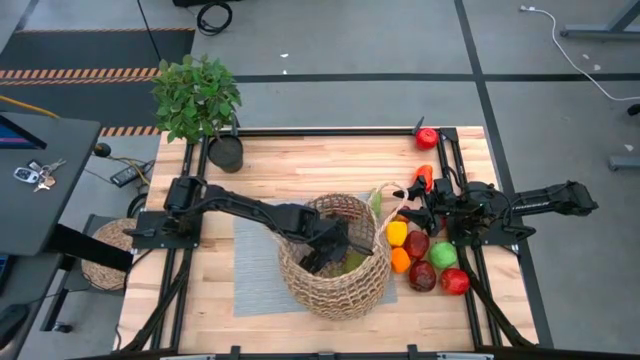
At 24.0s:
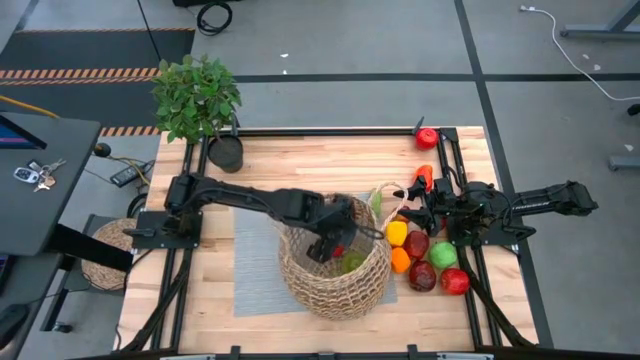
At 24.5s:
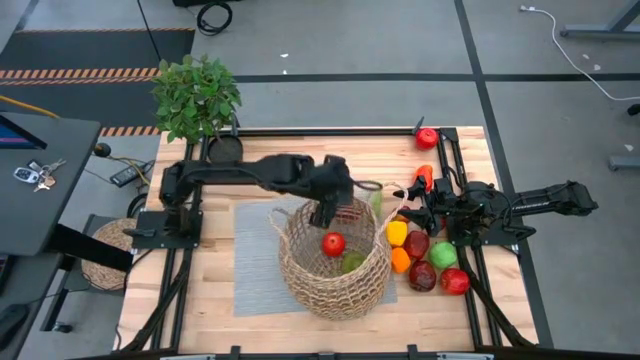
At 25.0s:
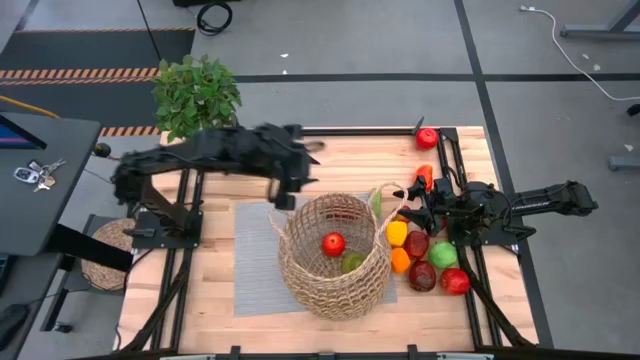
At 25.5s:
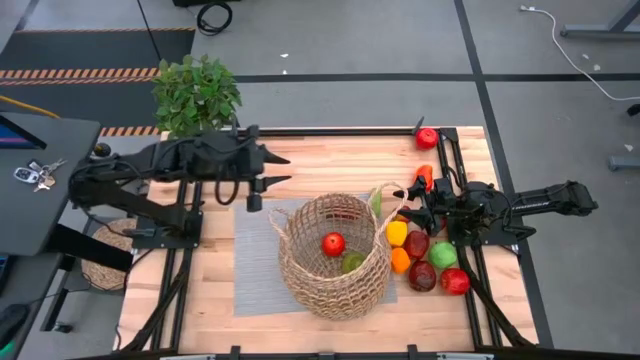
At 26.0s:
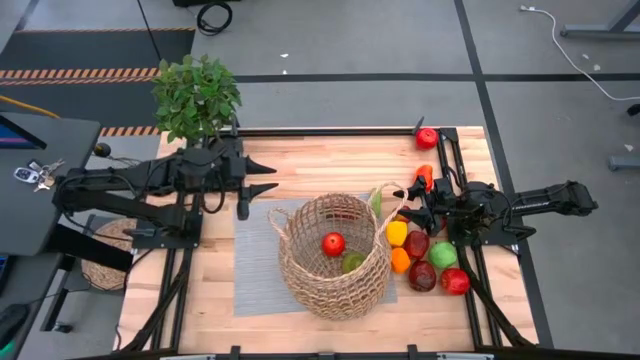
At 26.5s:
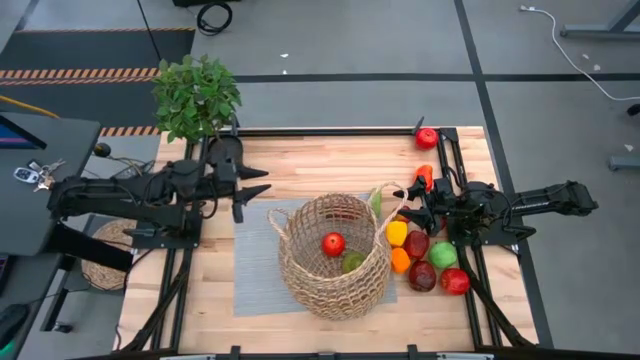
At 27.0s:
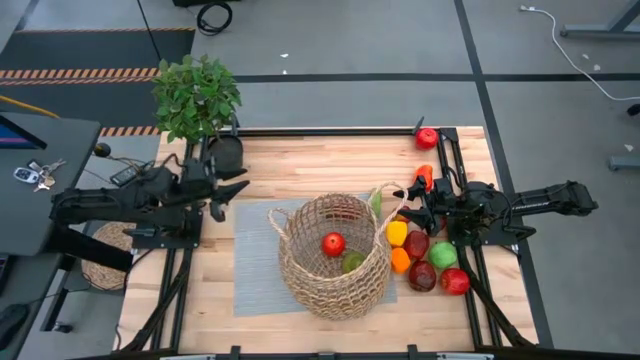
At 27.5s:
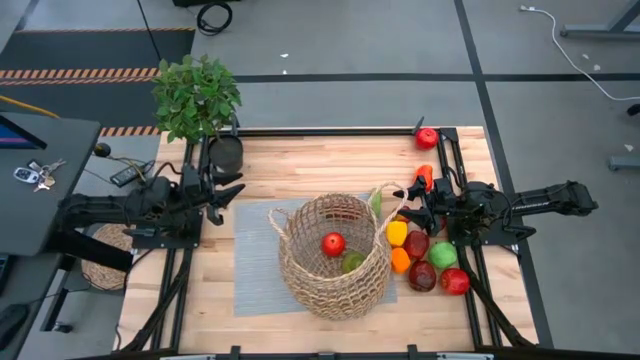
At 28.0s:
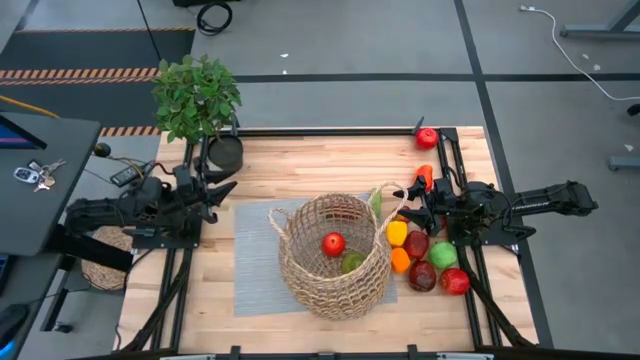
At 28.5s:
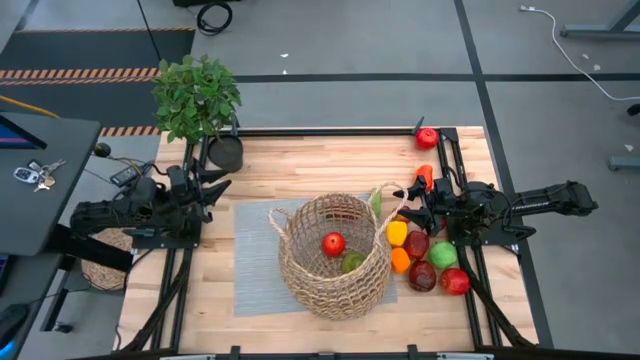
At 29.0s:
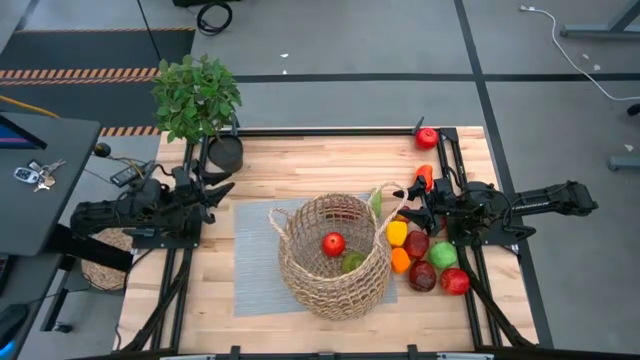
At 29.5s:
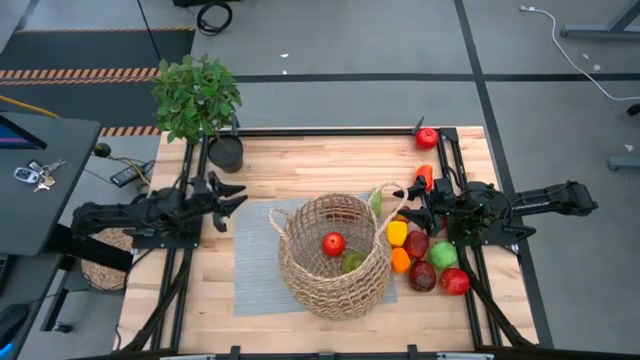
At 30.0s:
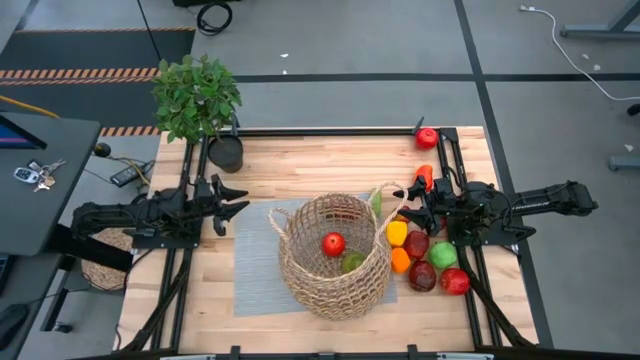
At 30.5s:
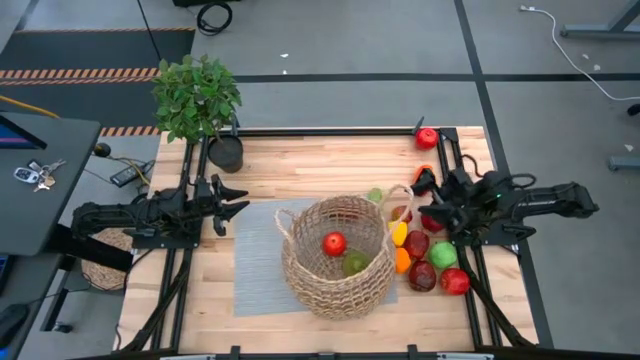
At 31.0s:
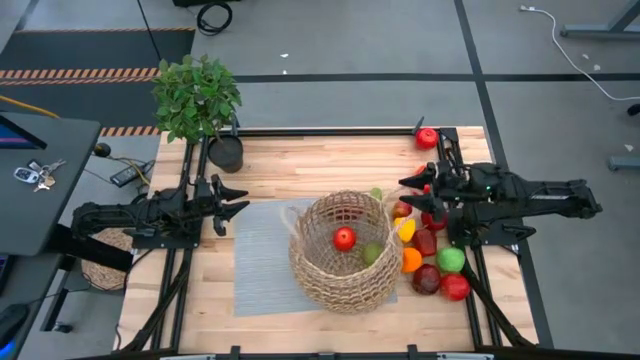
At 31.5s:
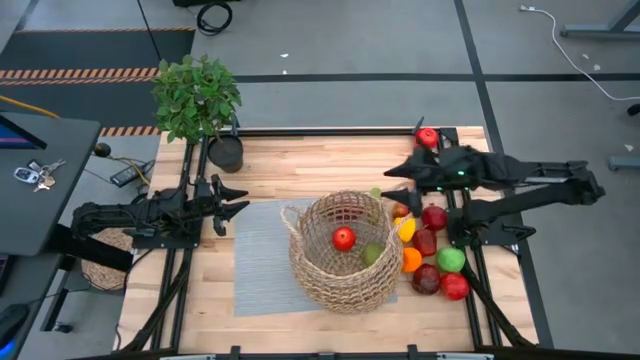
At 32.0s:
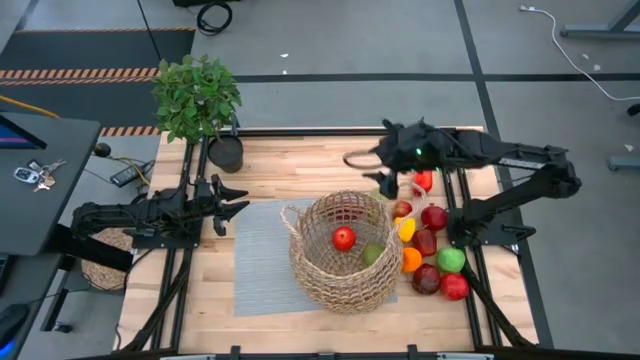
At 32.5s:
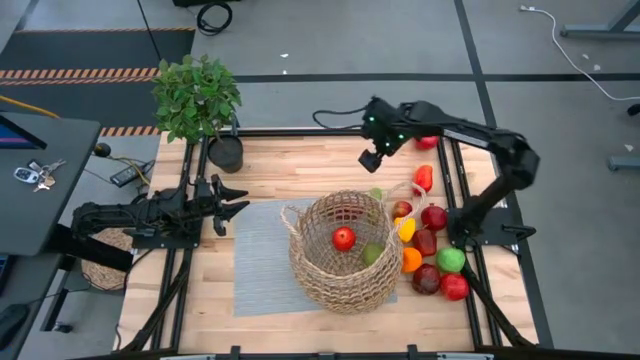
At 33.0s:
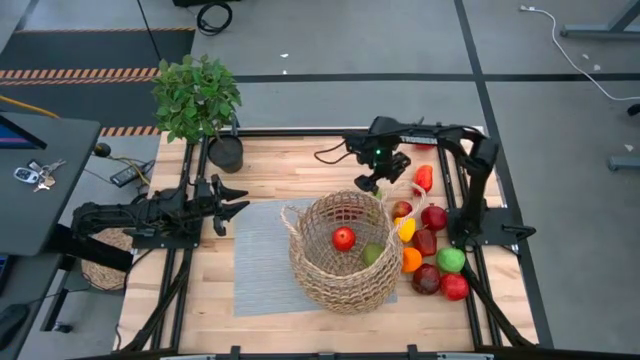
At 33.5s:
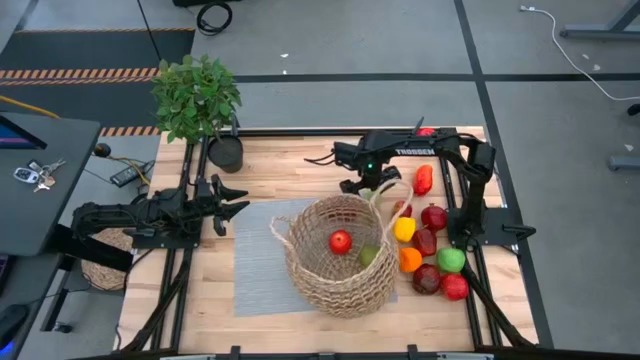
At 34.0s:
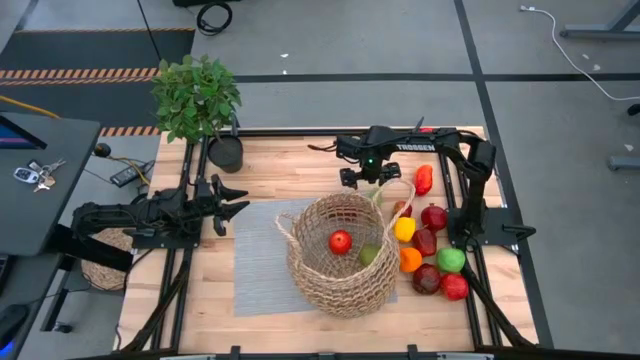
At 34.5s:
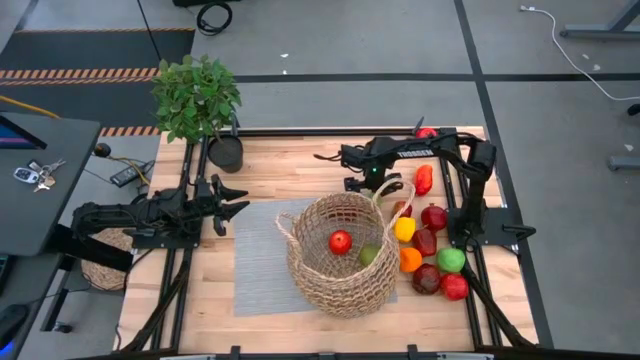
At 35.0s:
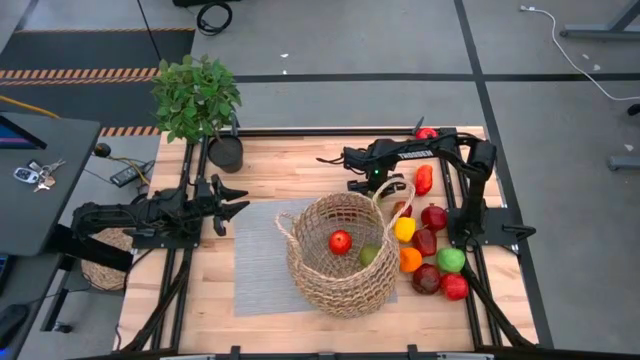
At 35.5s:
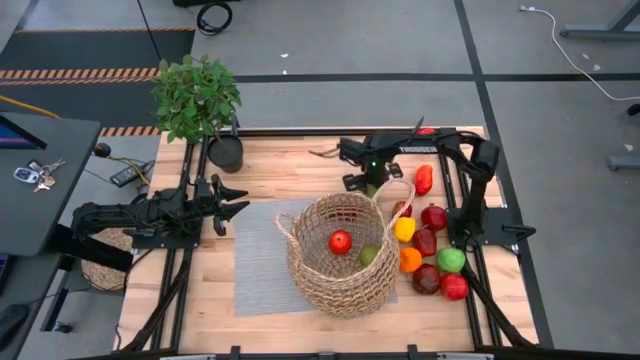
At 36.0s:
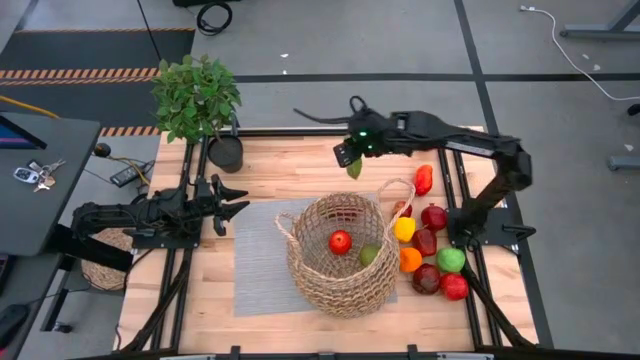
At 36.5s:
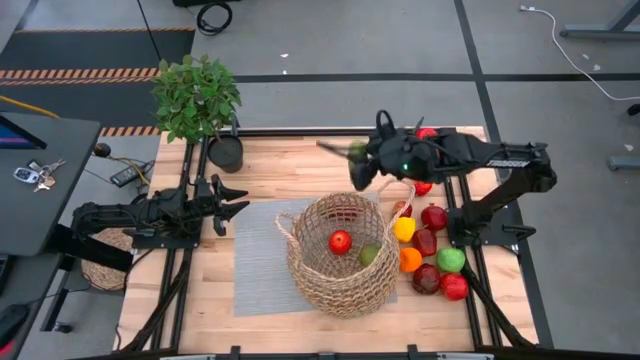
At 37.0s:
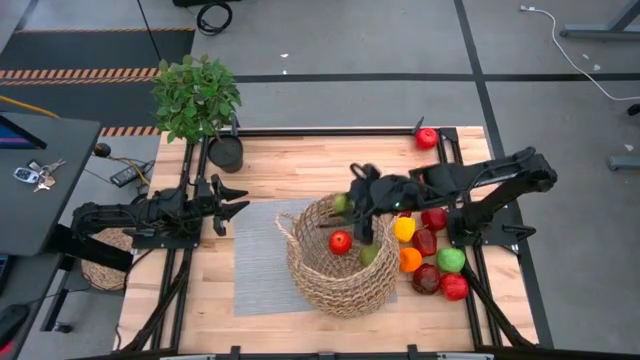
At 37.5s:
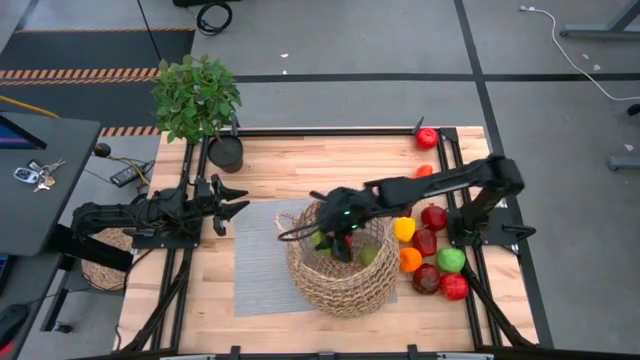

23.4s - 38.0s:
Task: Build produce basket
Put the green cucumber into the basket

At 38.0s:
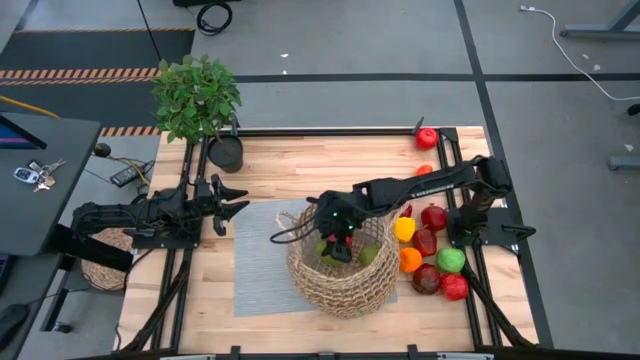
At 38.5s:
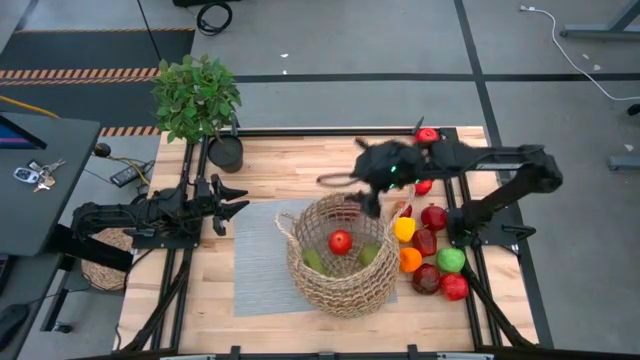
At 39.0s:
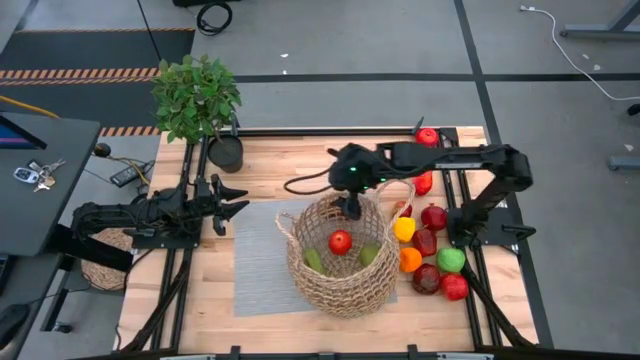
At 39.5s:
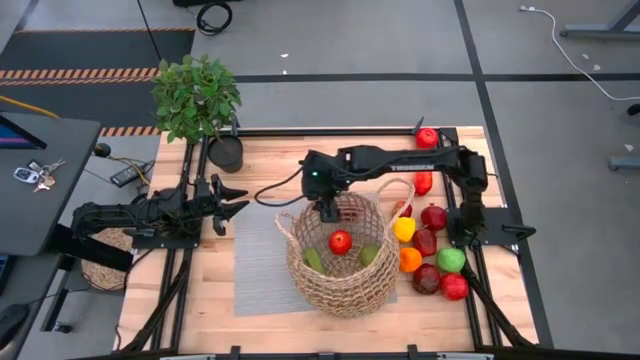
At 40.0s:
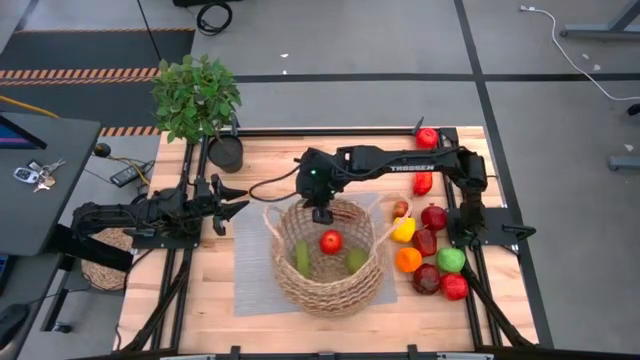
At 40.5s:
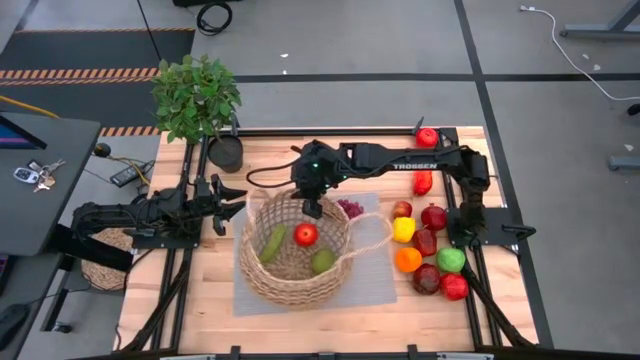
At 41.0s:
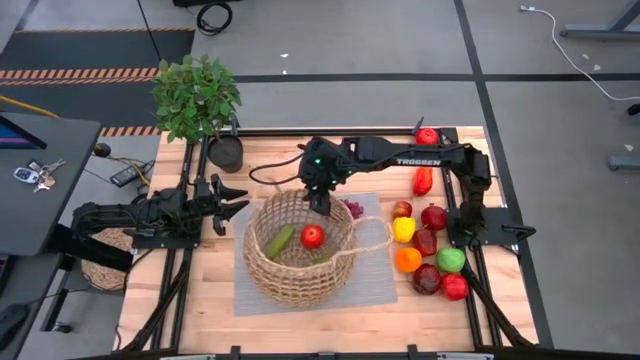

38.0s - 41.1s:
Adjust the basket

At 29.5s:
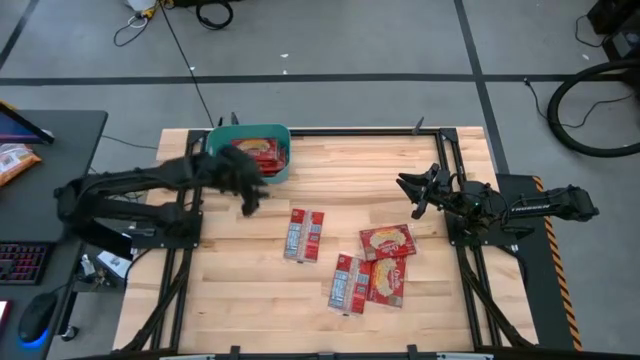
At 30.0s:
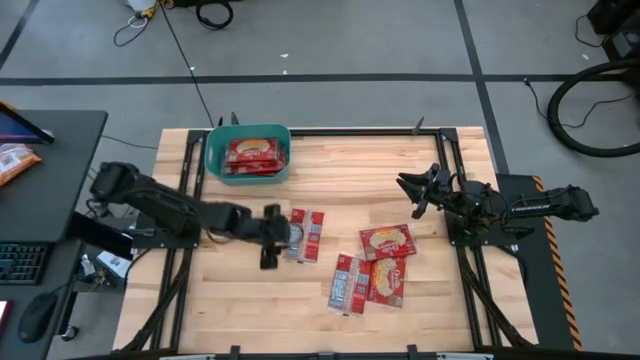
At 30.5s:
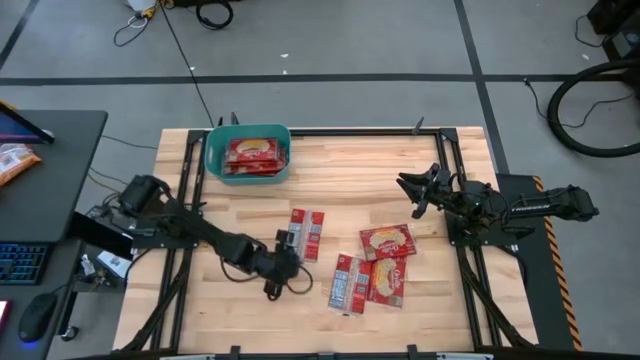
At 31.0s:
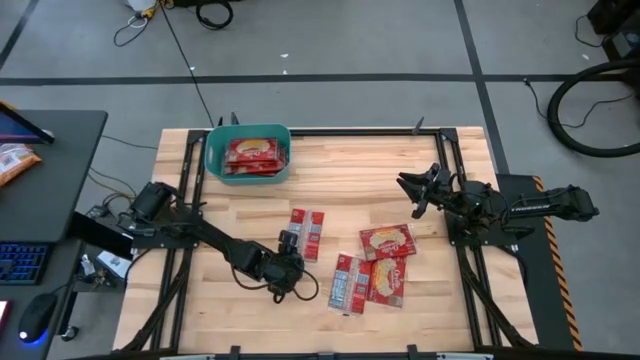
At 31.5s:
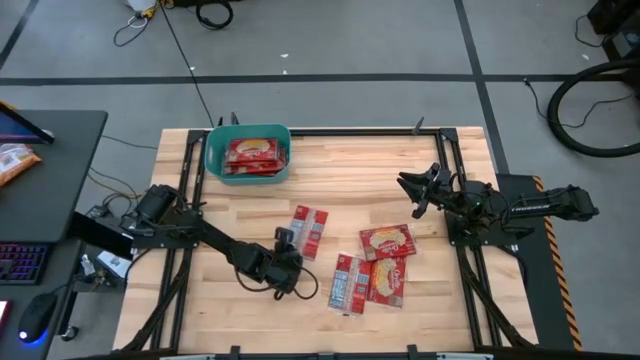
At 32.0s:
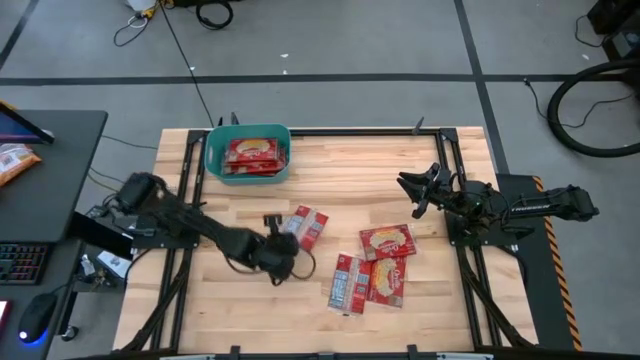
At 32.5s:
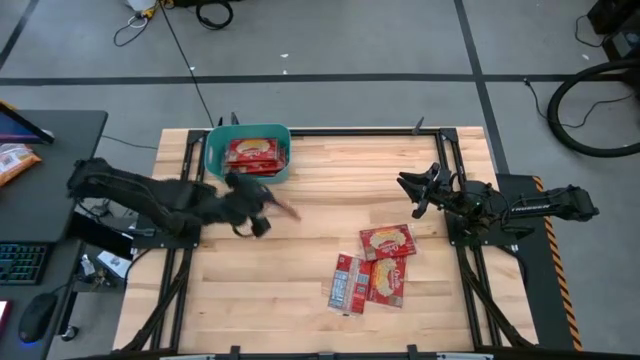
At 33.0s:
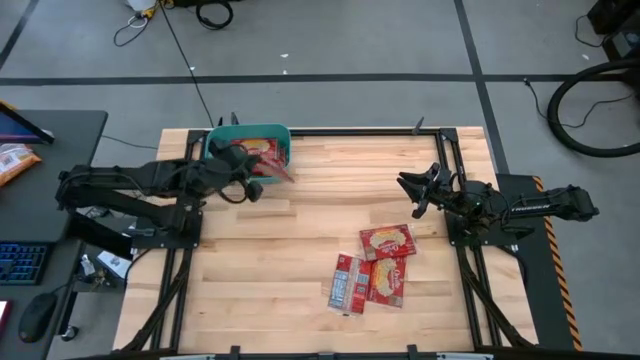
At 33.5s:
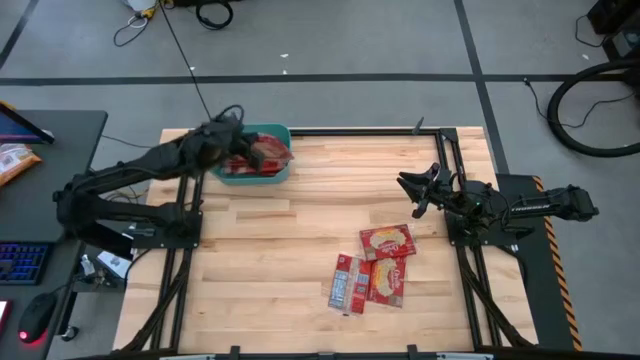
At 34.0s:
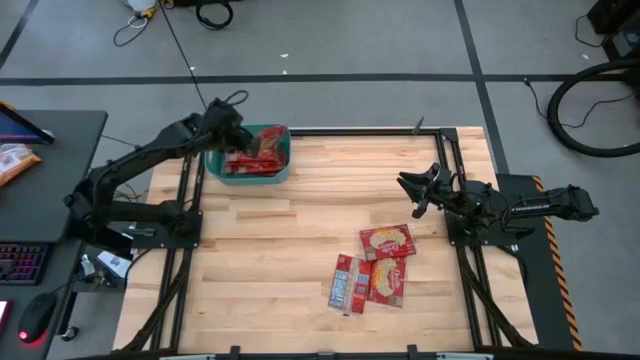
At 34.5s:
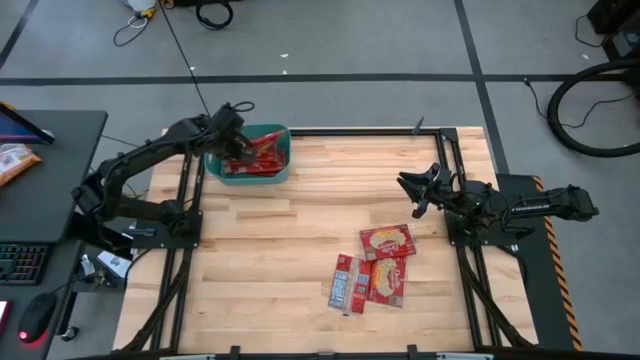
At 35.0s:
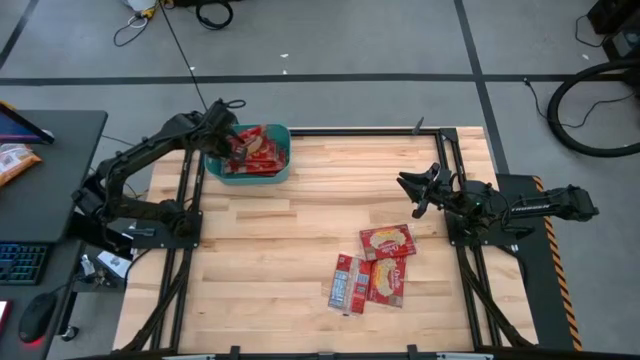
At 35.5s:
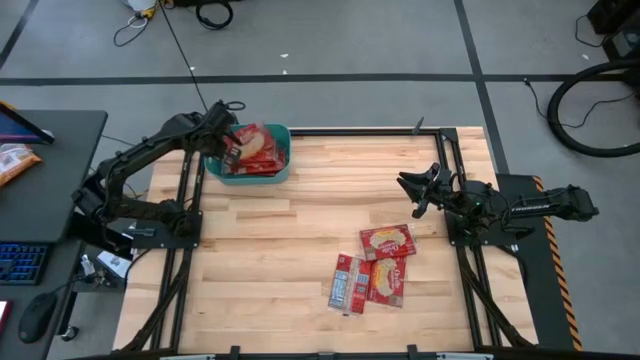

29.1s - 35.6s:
Task: Sort popcorn bags into baskets
Put the red popcorn bag into the blue bin
